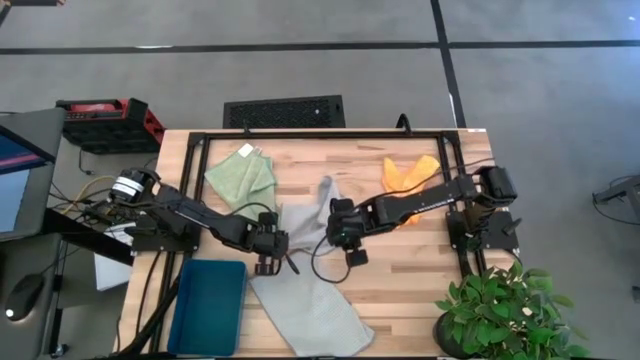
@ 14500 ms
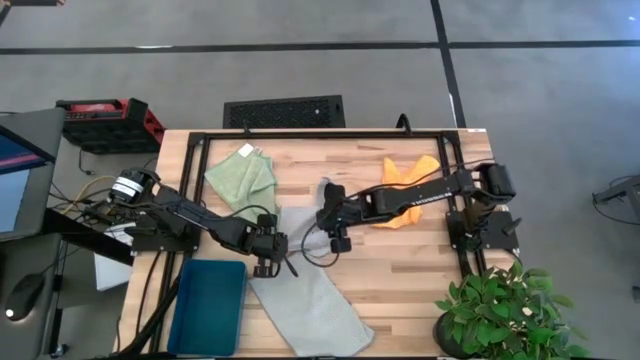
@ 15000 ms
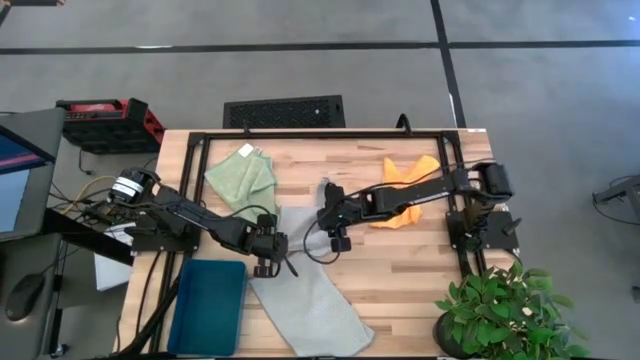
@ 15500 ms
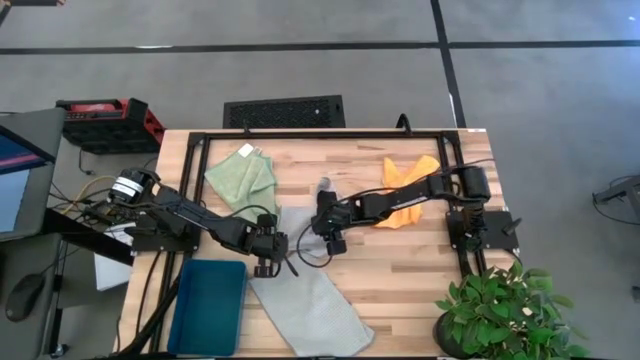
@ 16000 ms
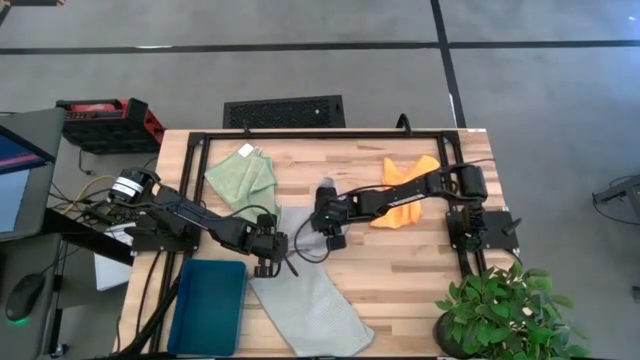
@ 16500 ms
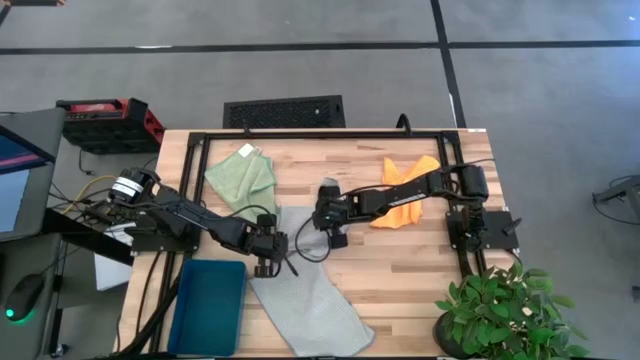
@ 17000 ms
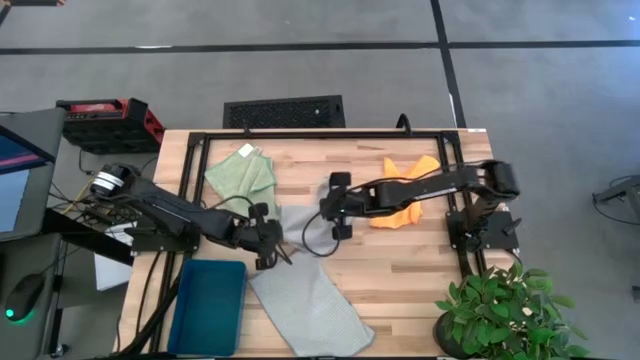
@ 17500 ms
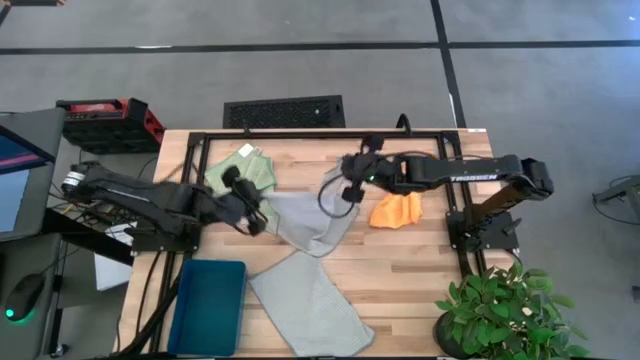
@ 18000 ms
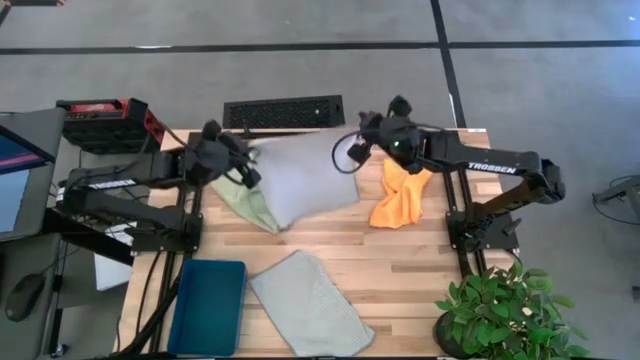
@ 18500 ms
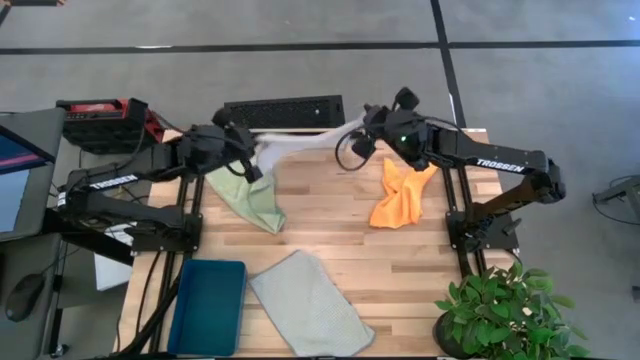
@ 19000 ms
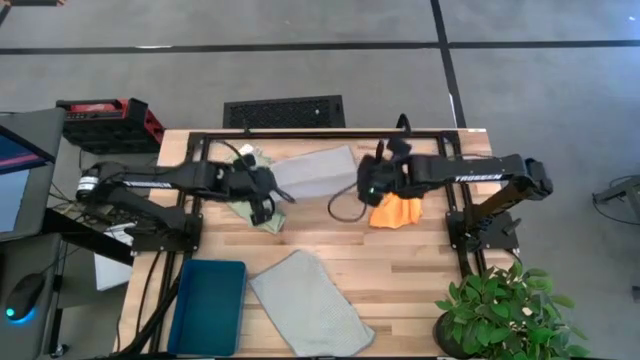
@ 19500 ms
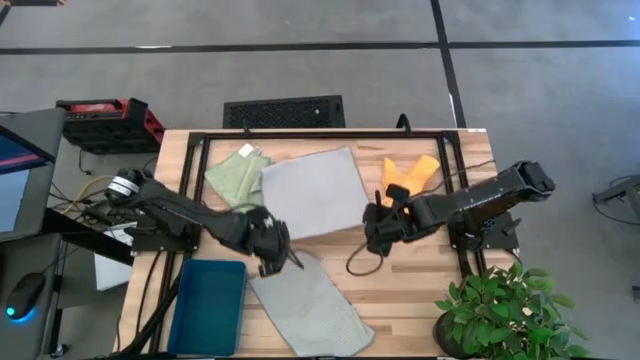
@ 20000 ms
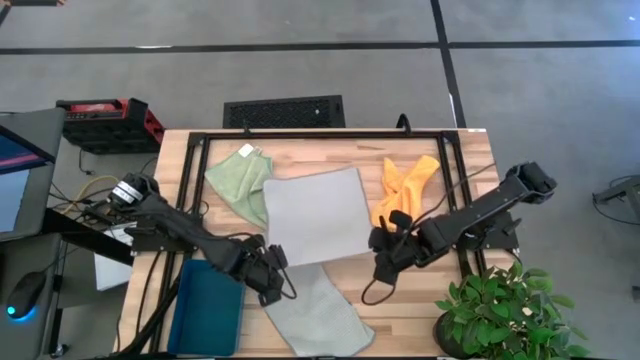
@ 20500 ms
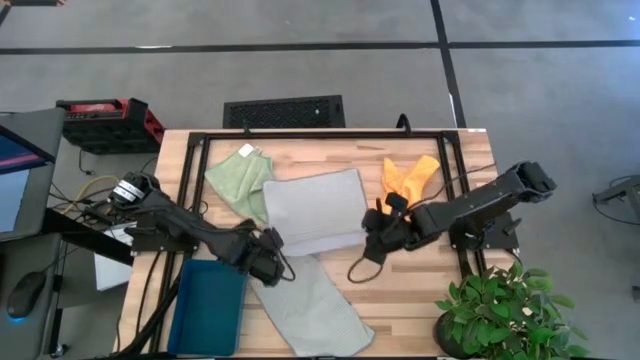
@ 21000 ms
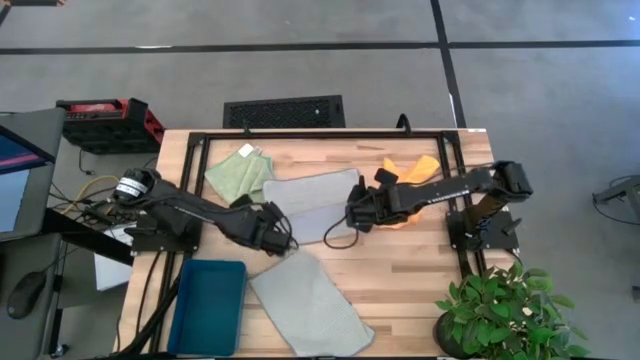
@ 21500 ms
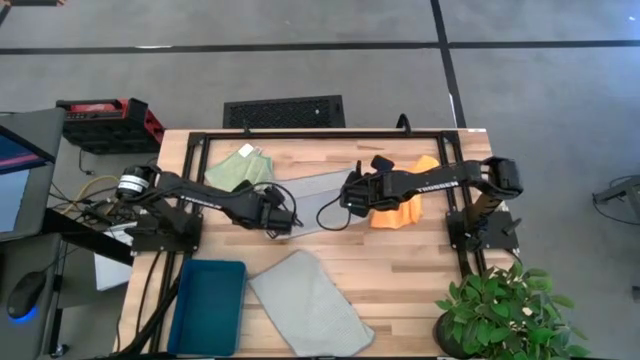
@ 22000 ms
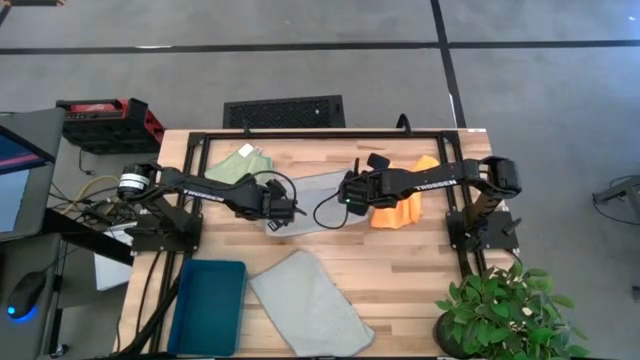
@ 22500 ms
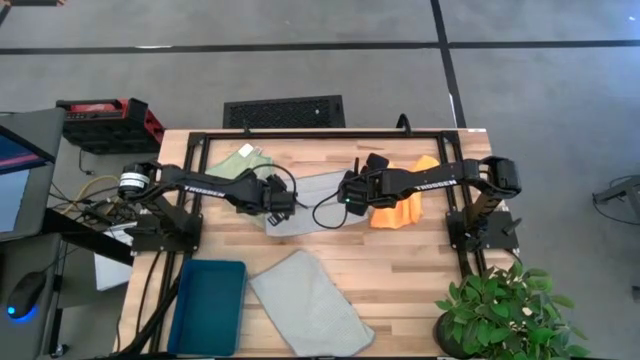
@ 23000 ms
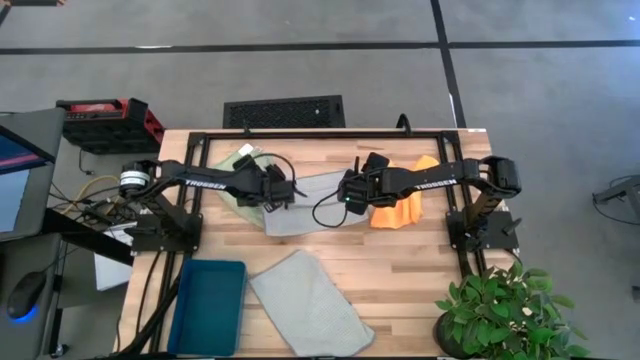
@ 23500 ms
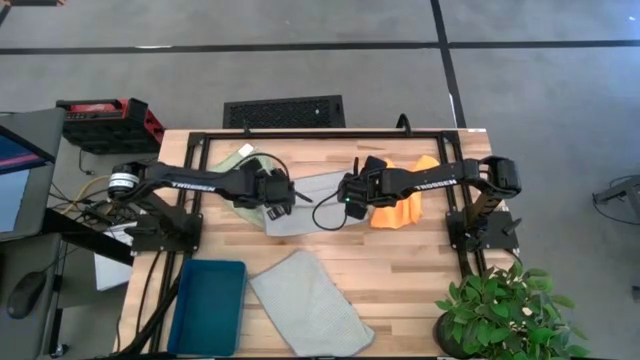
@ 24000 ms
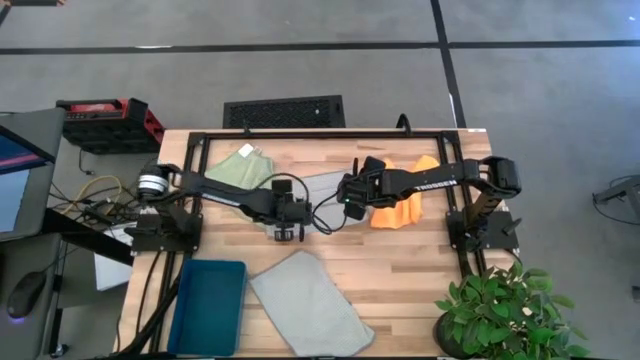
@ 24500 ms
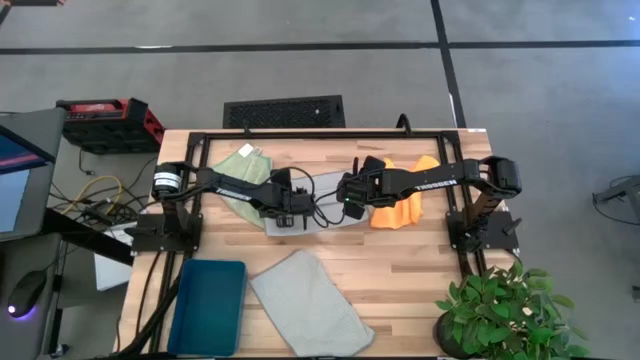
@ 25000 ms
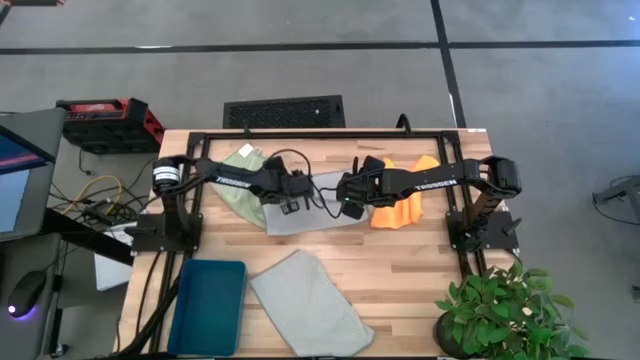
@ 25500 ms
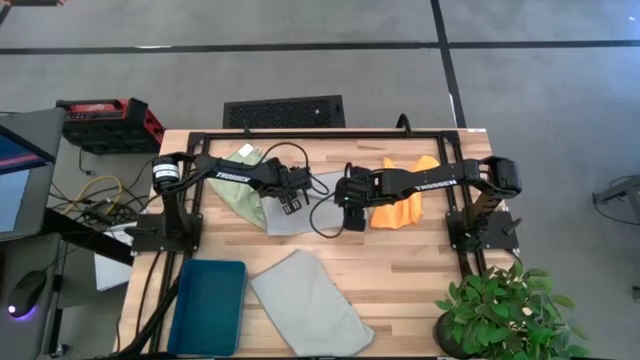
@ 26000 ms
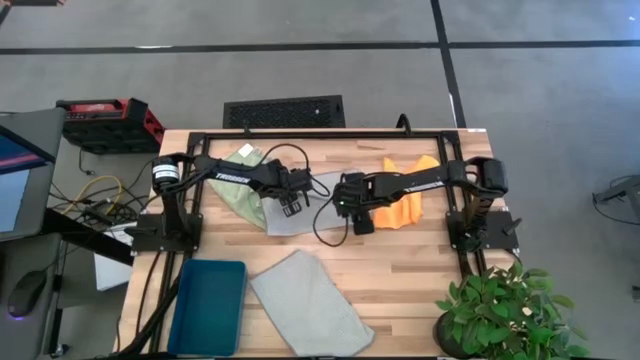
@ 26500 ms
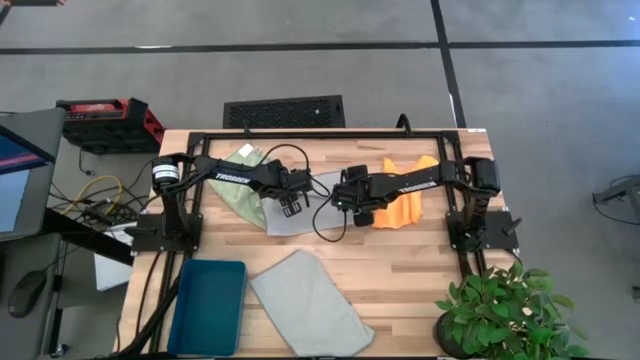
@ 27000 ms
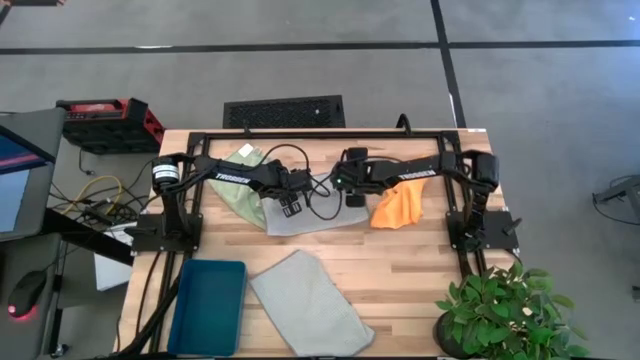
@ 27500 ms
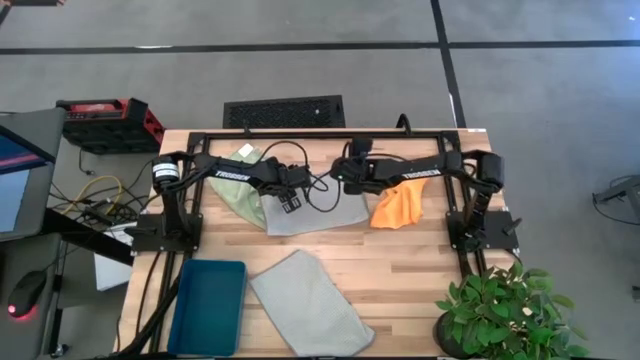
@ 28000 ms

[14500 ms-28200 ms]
Task: Fold microfiber towels
Fold the top gray microfiber towel

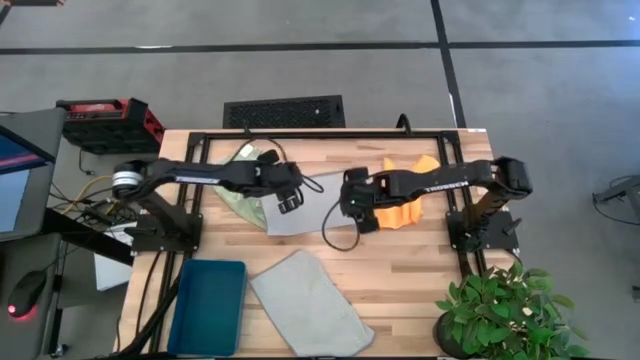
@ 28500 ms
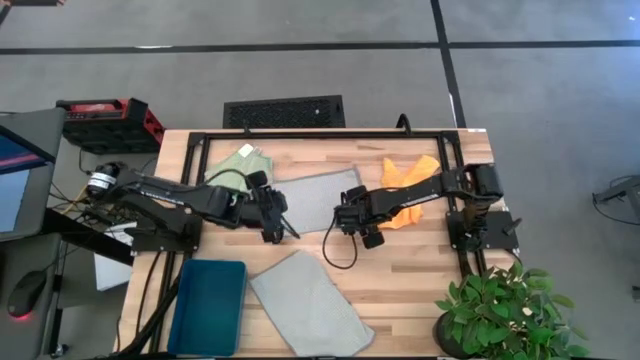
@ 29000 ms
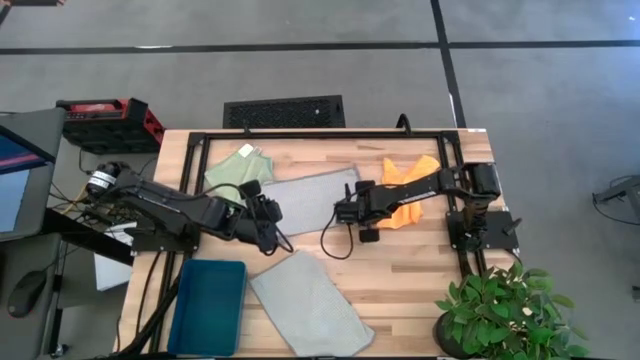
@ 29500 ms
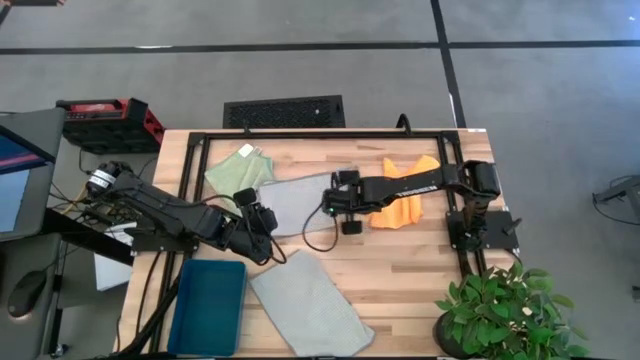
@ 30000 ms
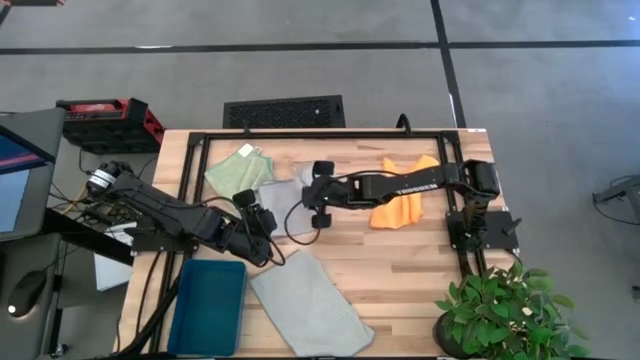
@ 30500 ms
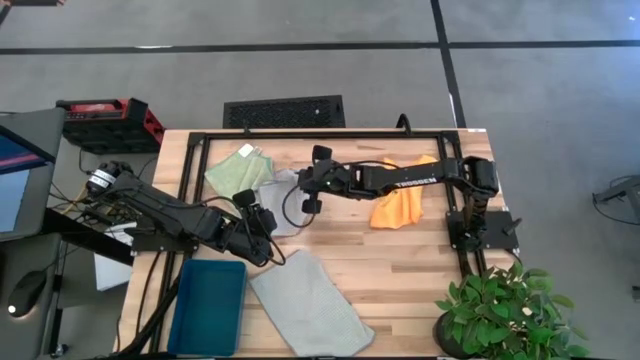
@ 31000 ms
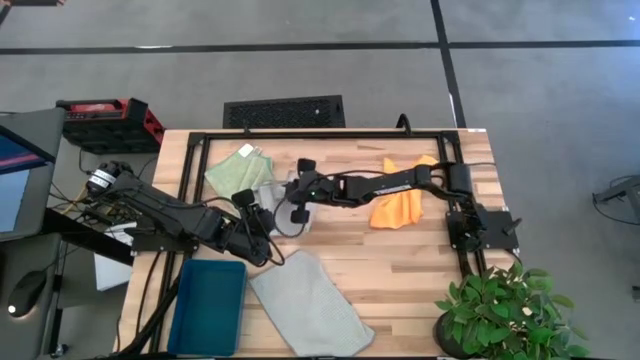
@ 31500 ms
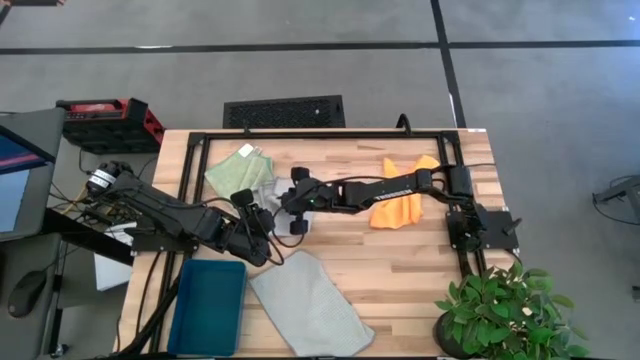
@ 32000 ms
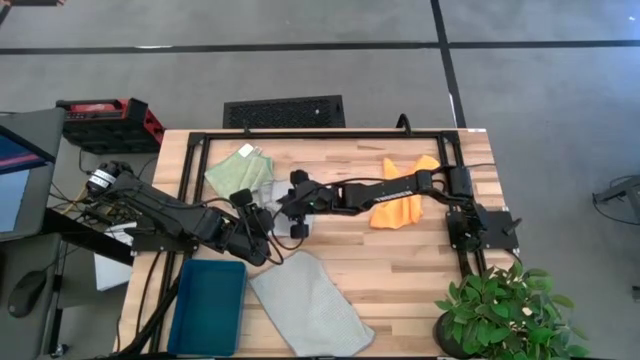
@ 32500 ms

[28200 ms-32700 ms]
Fold the top gray microfiber towel

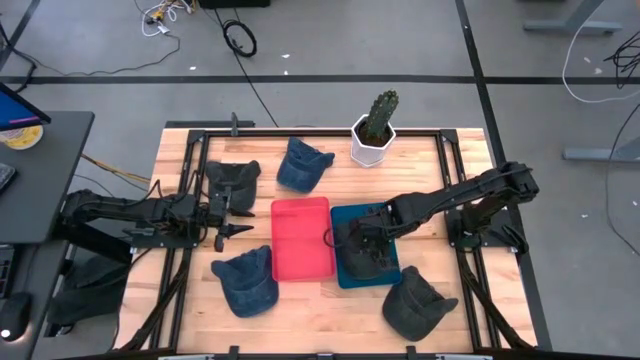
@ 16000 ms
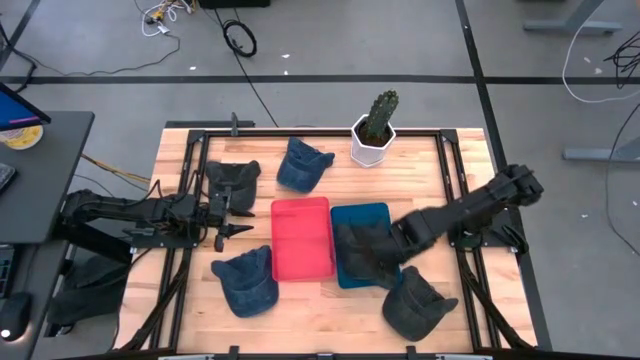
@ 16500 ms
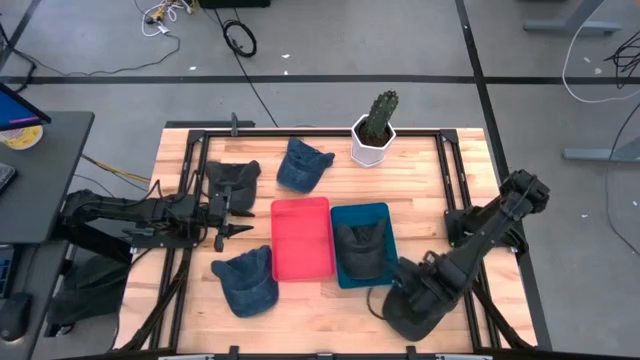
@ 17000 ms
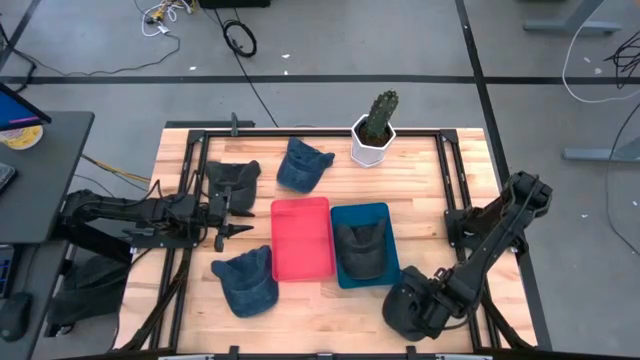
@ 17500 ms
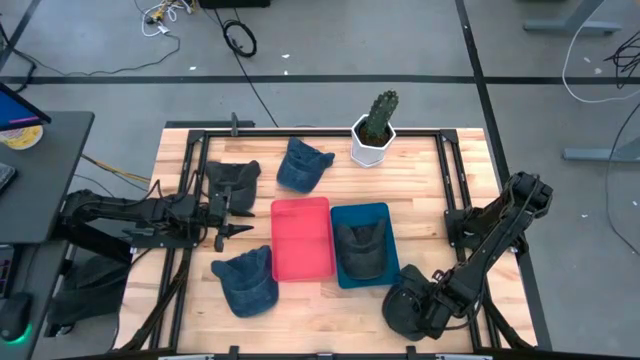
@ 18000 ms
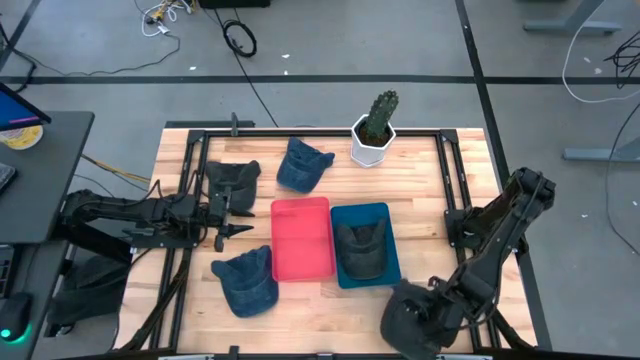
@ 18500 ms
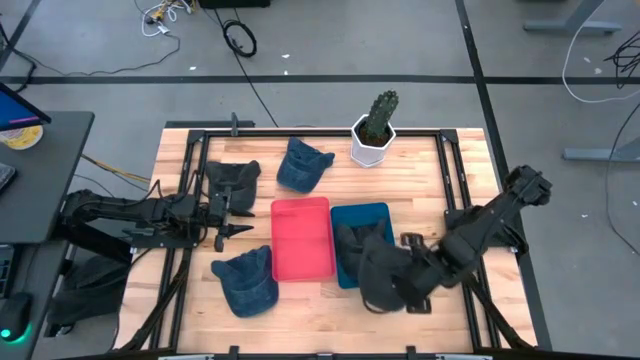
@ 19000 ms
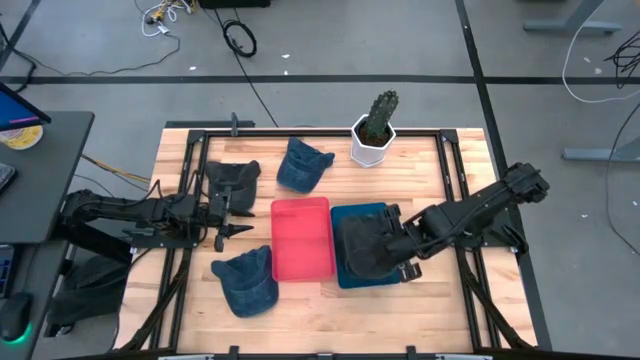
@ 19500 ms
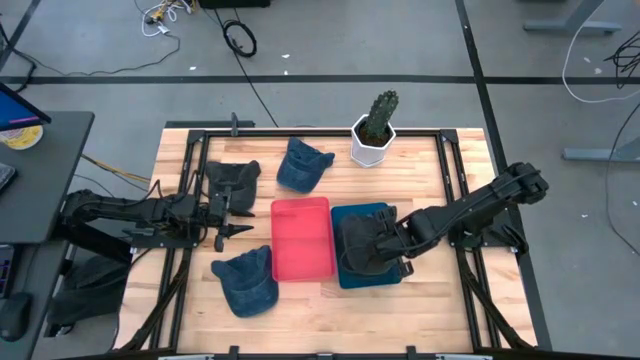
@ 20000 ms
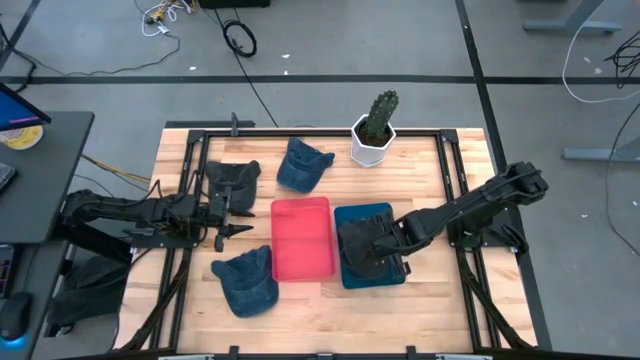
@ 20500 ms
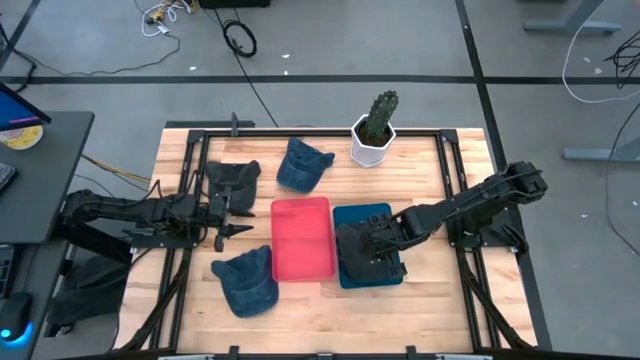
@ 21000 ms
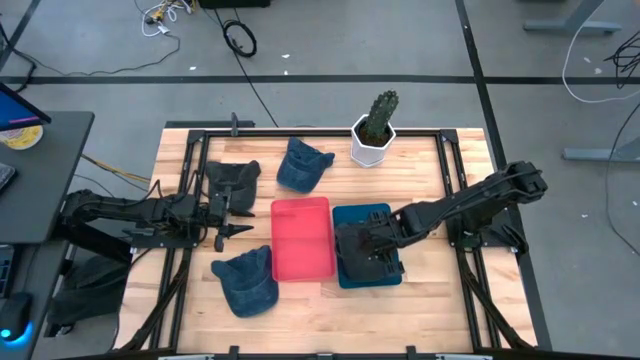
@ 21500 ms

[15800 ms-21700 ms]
Task: Pick & Place hat
Put the bottom black cap into the blue bin
